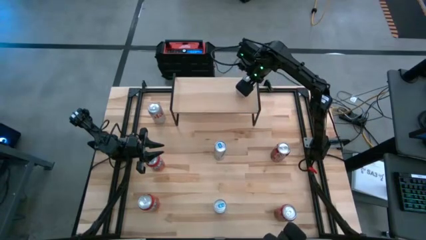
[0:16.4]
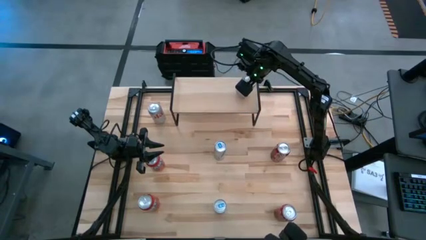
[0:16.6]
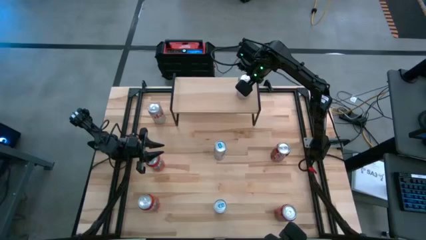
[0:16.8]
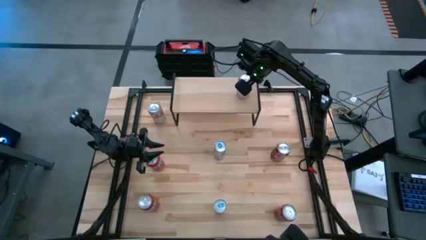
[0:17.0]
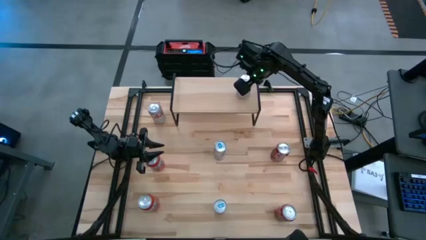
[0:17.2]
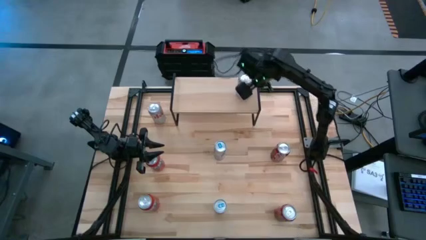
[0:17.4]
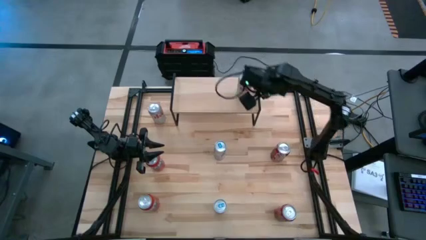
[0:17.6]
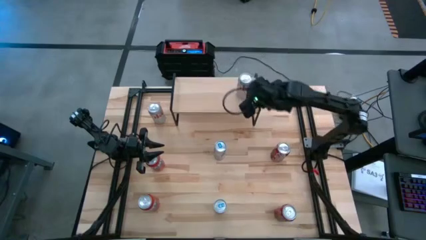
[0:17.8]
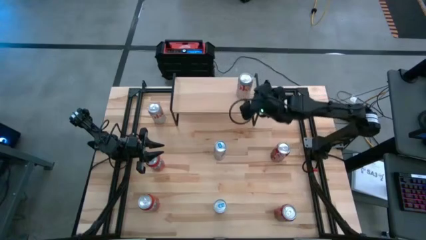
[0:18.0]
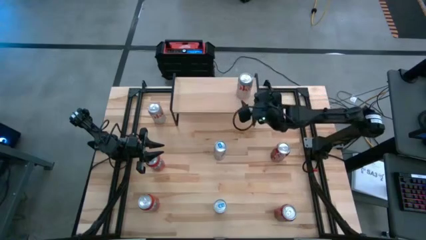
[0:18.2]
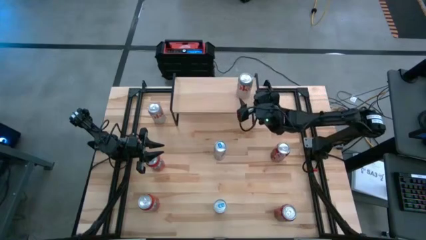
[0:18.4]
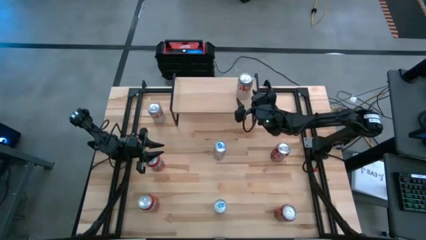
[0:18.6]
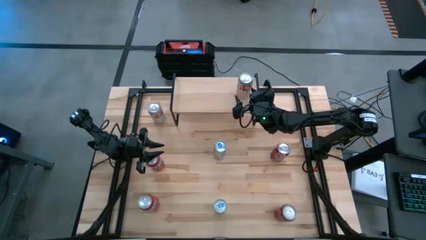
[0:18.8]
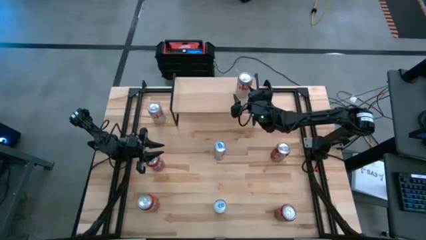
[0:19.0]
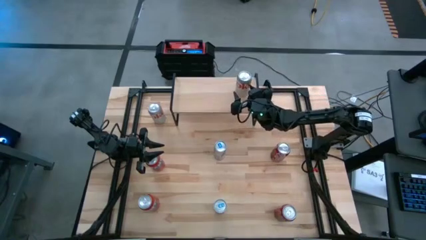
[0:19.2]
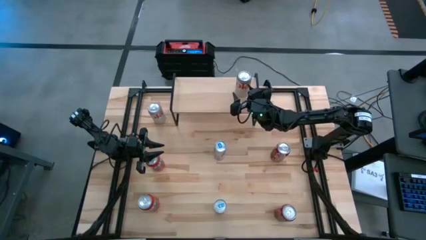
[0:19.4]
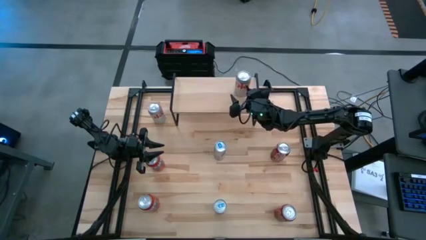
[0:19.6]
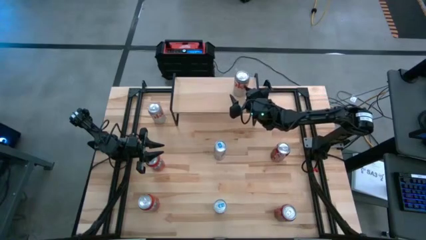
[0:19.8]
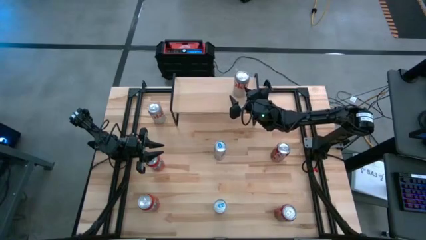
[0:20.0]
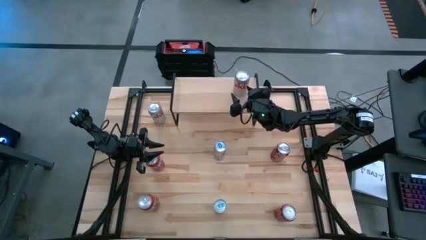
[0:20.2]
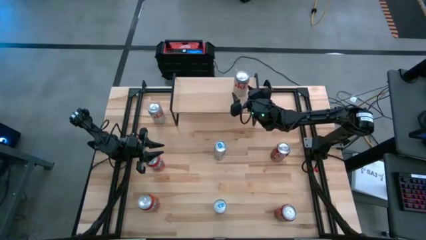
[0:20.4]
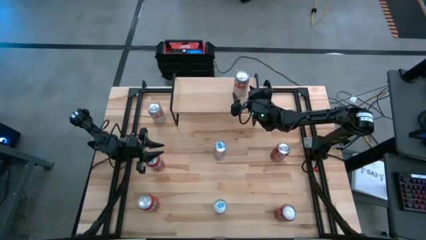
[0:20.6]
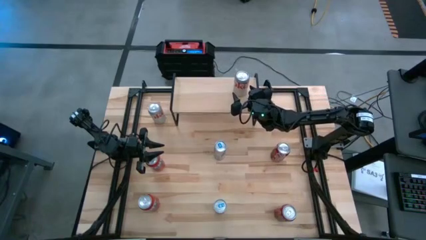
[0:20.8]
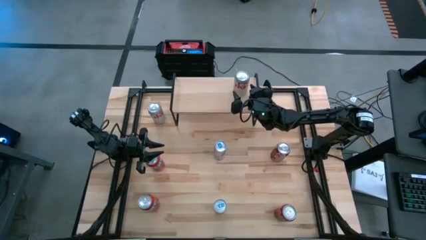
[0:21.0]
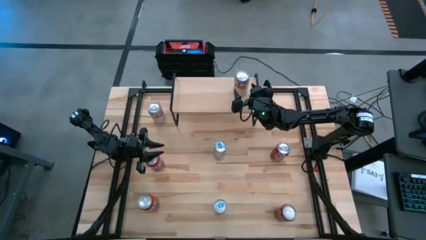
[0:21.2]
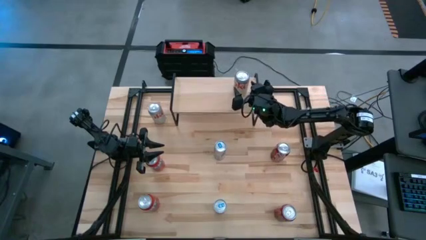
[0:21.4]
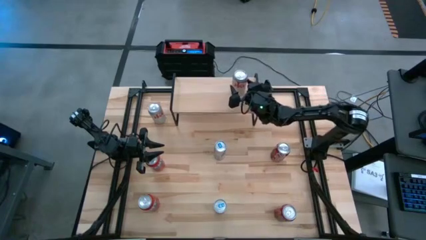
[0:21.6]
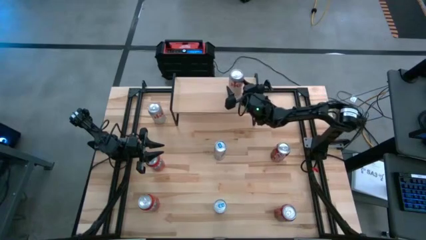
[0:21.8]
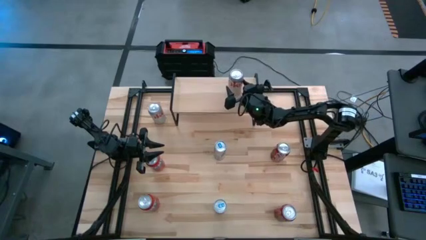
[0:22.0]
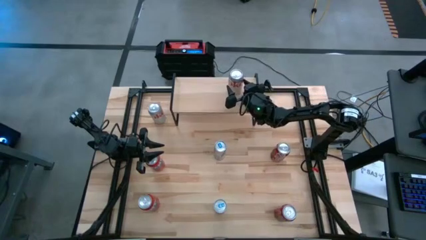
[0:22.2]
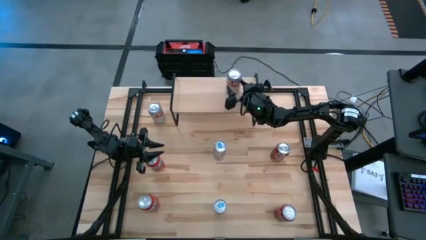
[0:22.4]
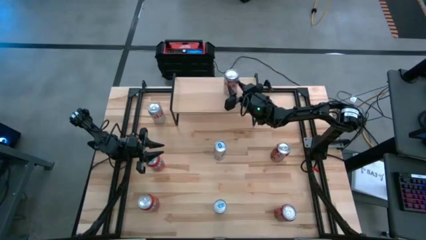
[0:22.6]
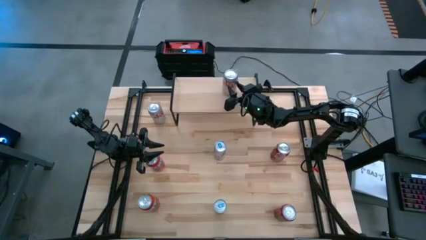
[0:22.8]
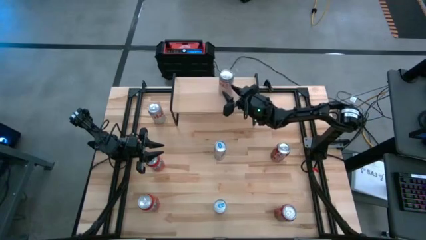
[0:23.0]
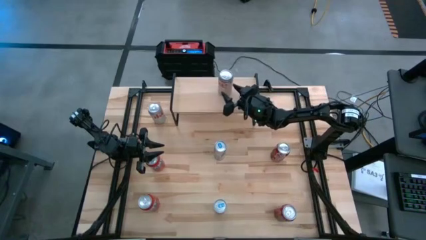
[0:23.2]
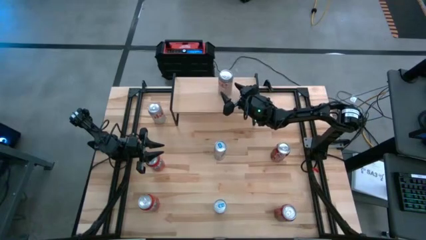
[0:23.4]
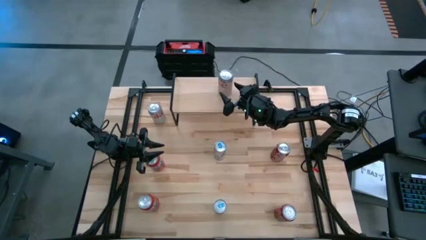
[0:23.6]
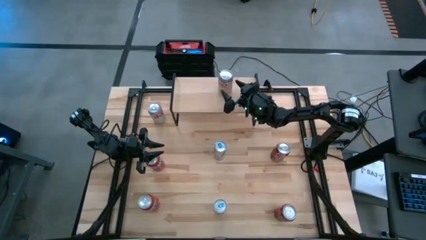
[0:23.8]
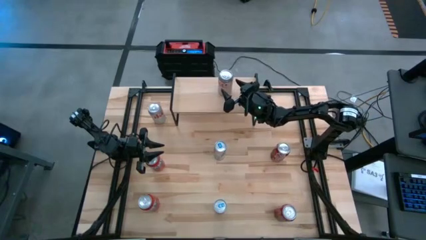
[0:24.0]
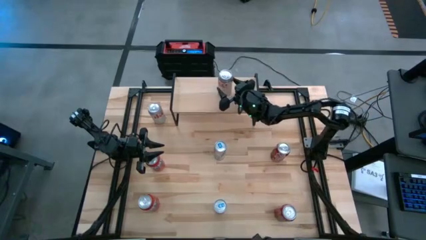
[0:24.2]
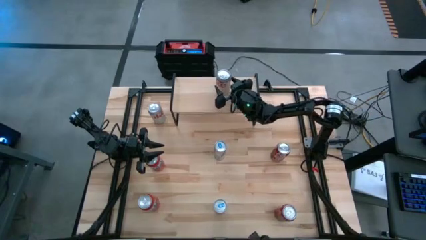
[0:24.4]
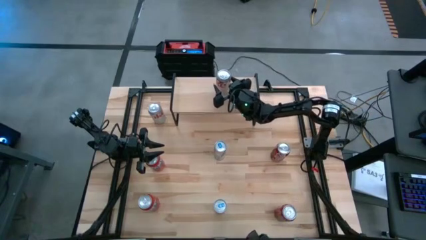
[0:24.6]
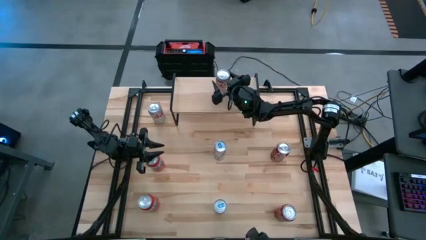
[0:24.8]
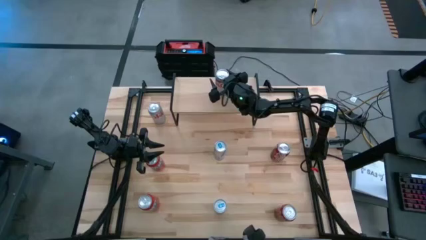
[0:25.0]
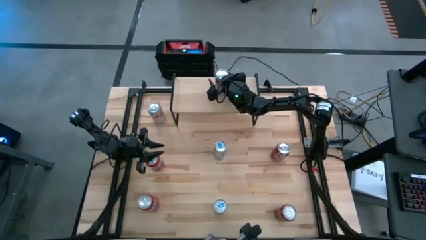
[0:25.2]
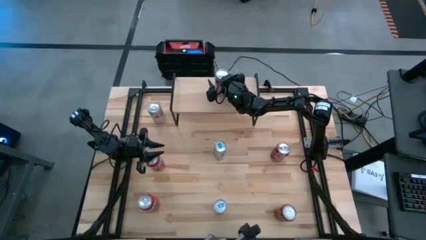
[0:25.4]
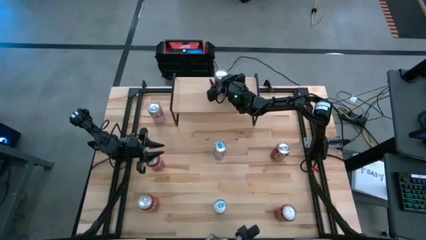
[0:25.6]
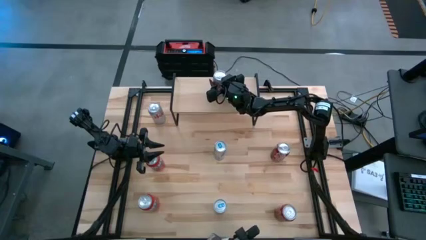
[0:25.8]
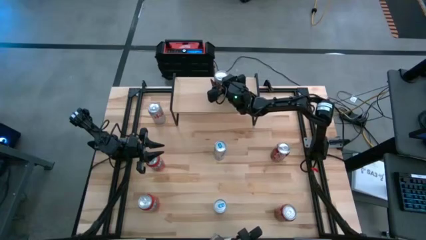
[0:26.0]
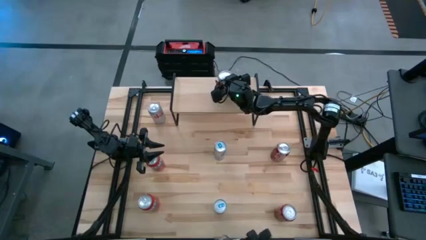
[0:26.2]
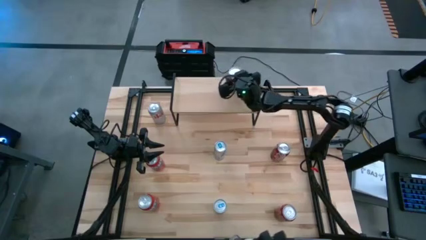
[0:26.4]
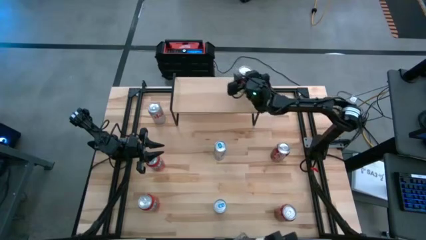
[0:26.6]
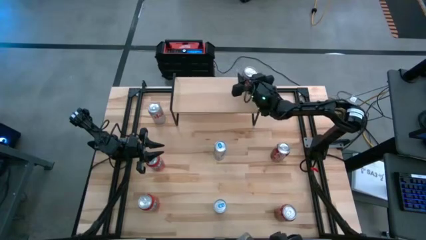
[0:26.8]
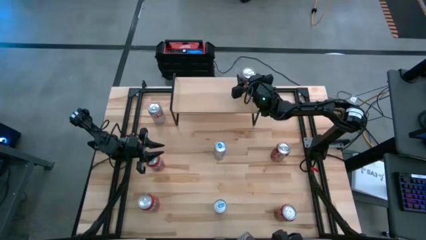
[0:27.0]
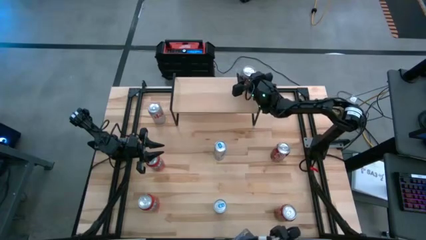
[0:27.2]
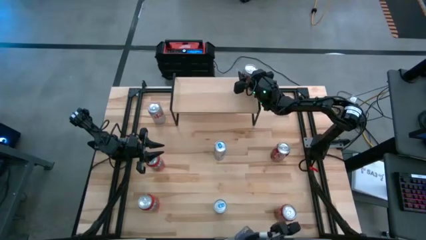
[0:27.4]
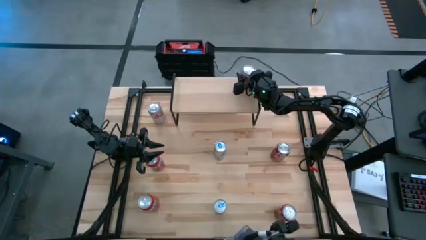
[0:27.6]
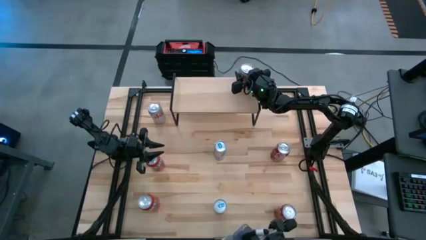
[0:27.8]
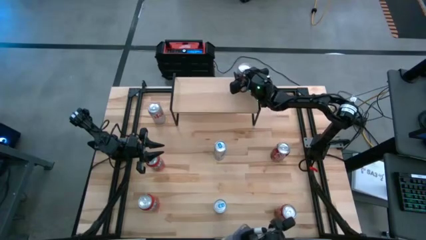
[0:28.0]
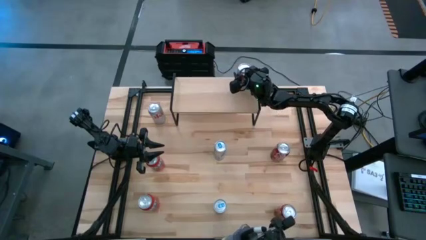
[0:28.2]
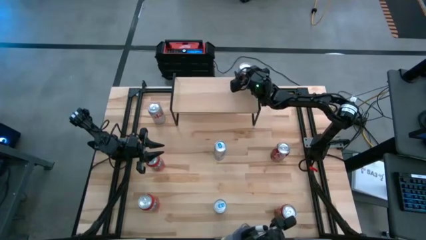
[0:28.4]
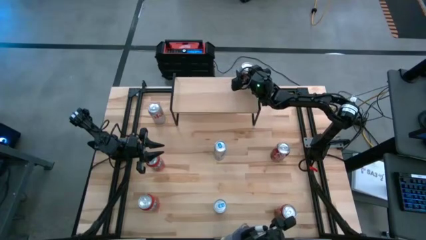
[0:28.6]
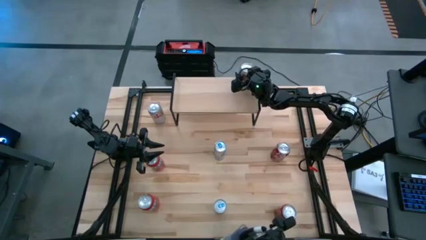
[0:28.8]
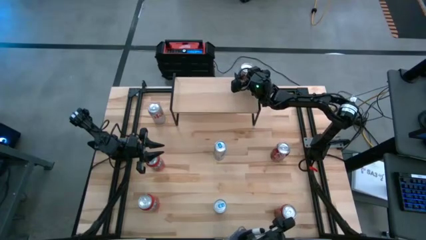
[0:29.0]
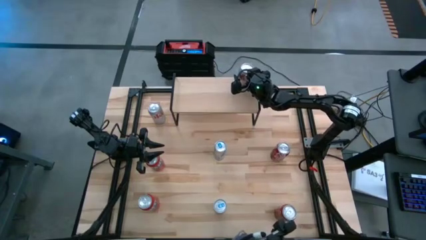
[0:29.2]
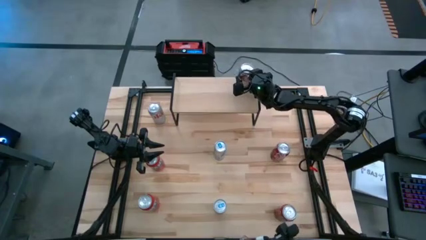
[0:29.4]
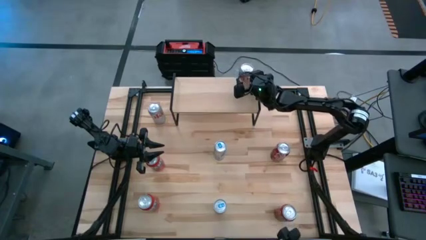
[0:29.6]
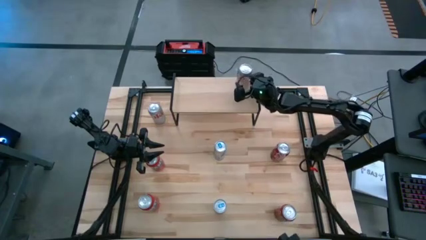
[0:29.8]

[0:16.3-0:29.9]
Task: Place canned beverage on shelf
Put the right red and silver soda can on the shelf
